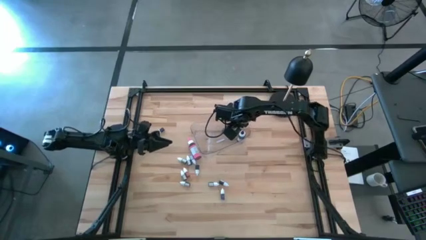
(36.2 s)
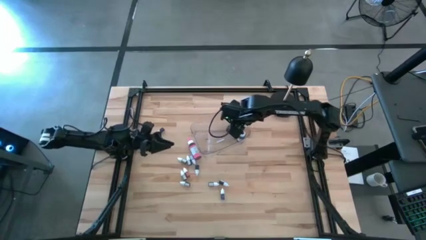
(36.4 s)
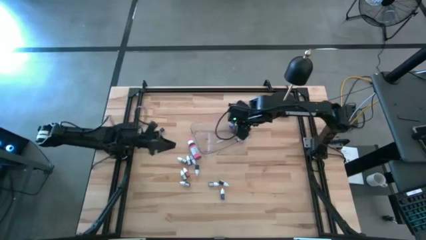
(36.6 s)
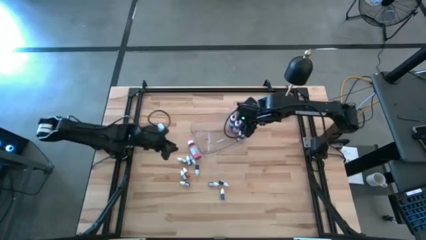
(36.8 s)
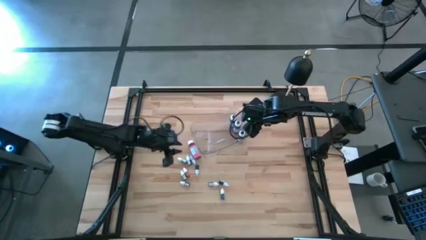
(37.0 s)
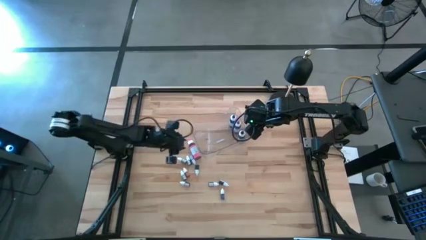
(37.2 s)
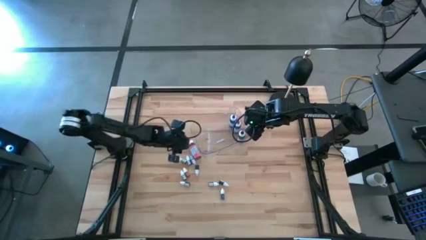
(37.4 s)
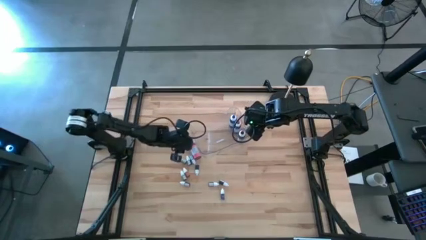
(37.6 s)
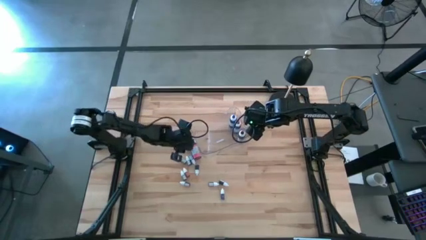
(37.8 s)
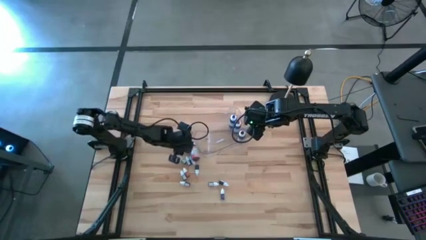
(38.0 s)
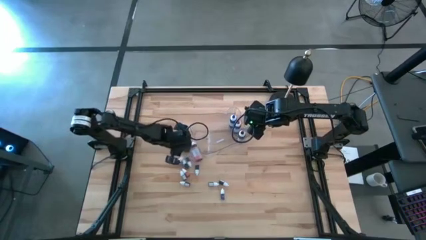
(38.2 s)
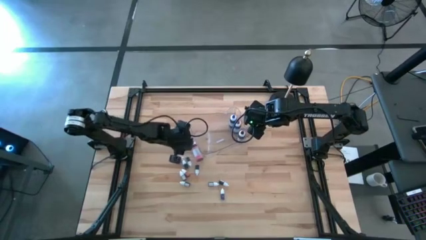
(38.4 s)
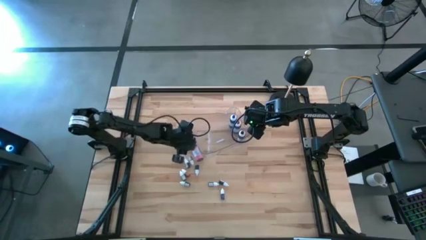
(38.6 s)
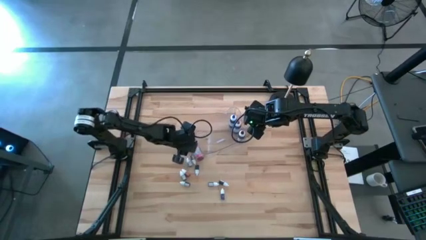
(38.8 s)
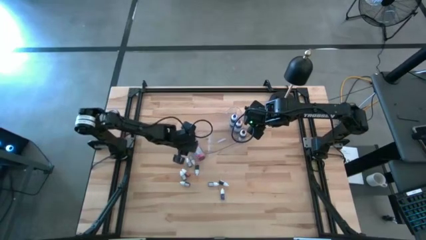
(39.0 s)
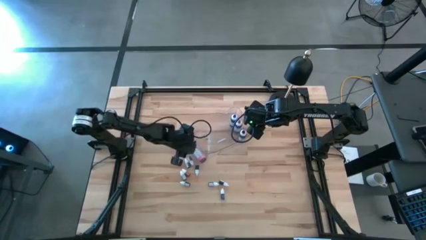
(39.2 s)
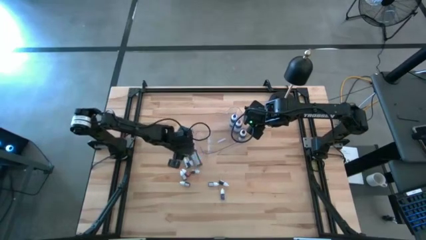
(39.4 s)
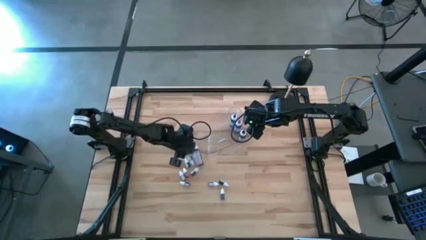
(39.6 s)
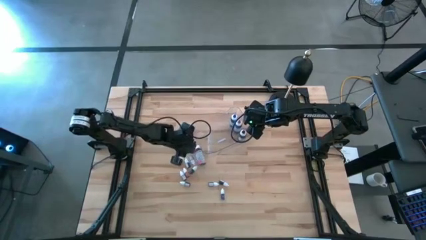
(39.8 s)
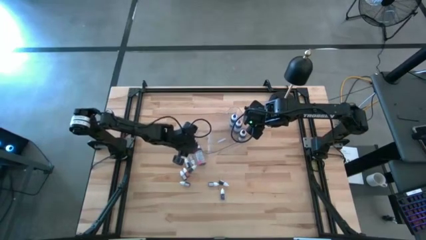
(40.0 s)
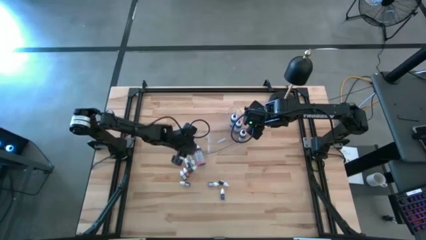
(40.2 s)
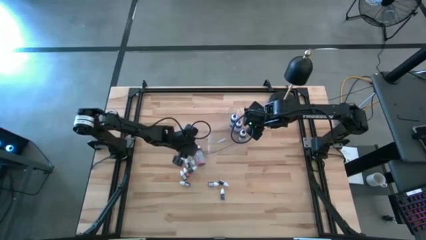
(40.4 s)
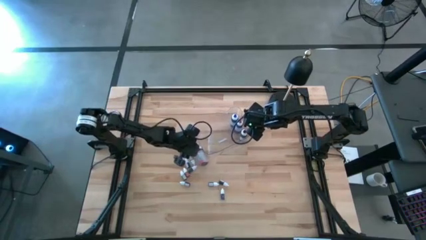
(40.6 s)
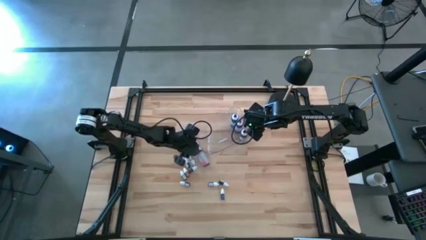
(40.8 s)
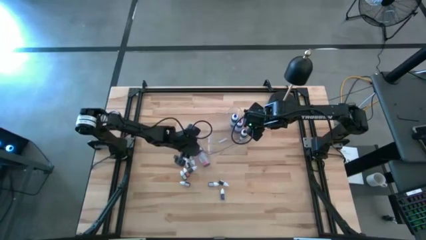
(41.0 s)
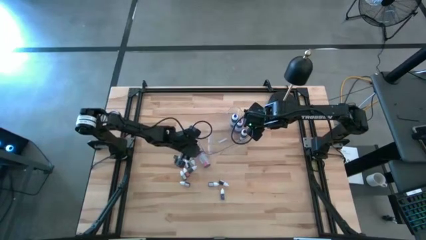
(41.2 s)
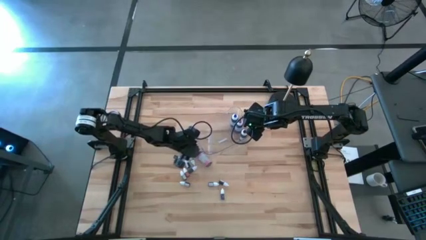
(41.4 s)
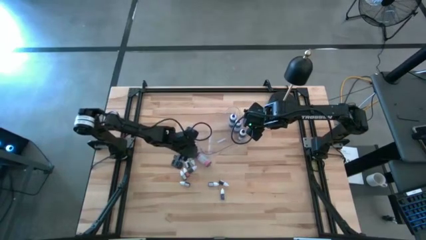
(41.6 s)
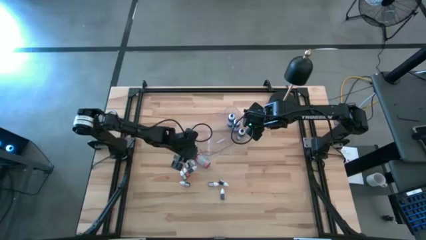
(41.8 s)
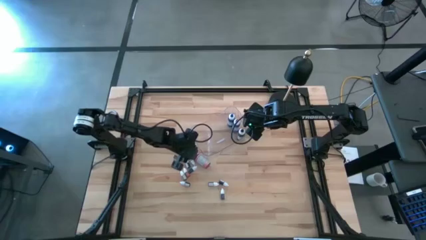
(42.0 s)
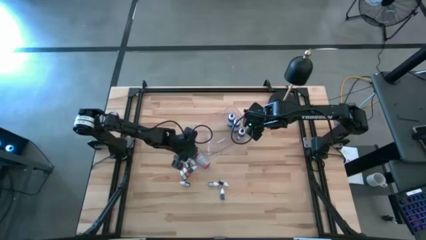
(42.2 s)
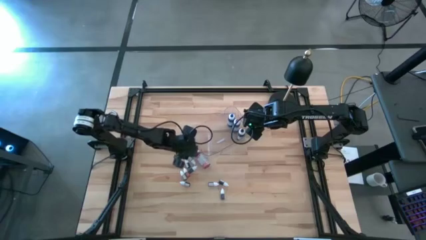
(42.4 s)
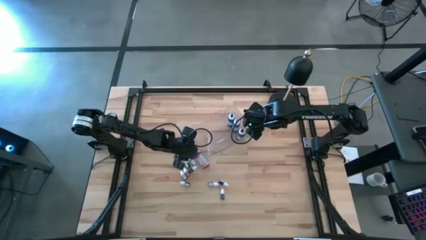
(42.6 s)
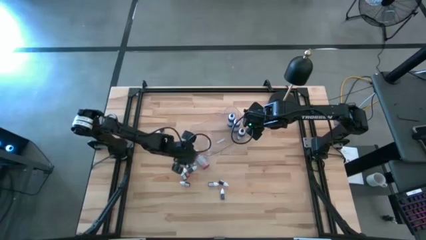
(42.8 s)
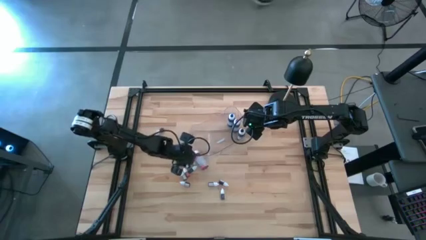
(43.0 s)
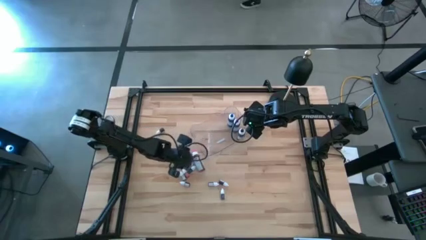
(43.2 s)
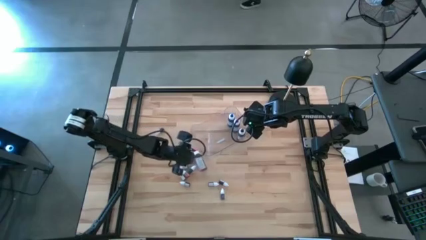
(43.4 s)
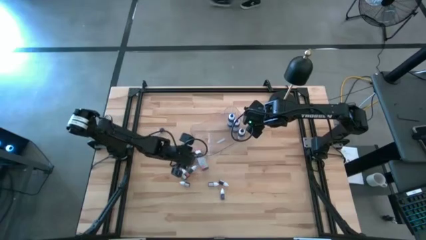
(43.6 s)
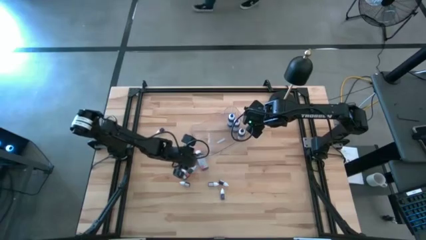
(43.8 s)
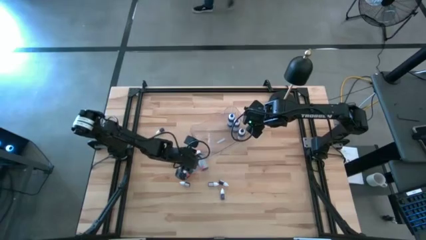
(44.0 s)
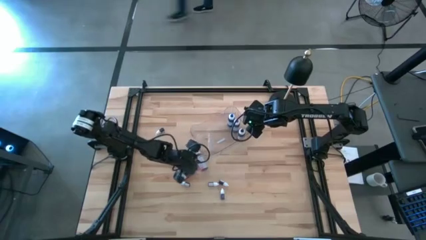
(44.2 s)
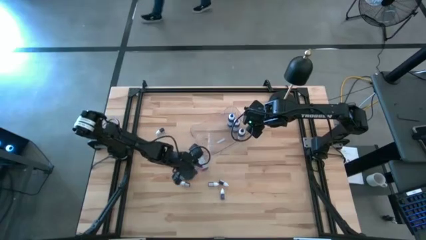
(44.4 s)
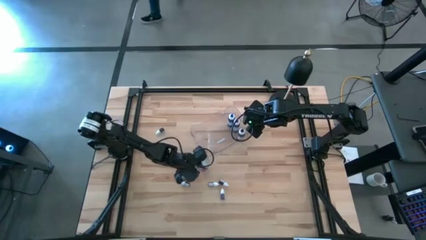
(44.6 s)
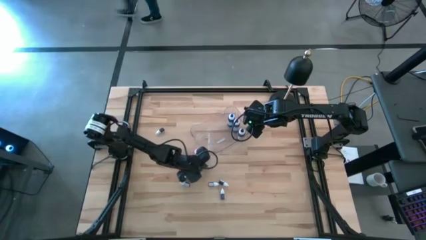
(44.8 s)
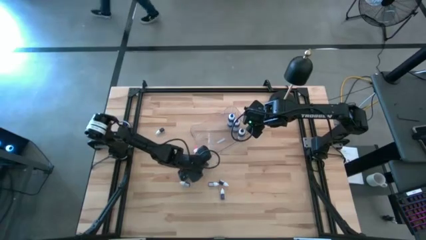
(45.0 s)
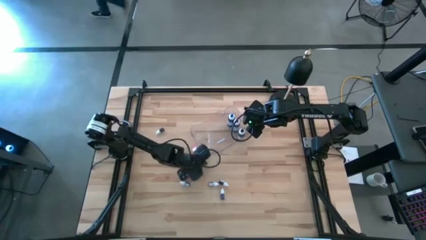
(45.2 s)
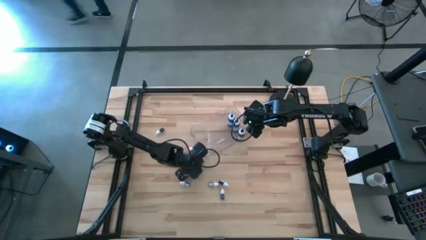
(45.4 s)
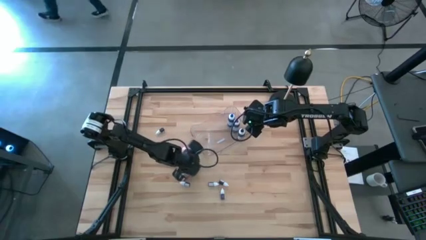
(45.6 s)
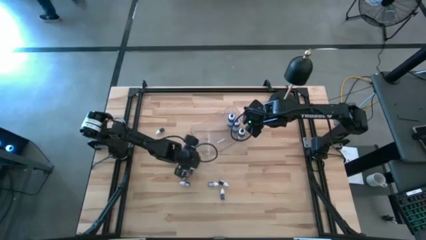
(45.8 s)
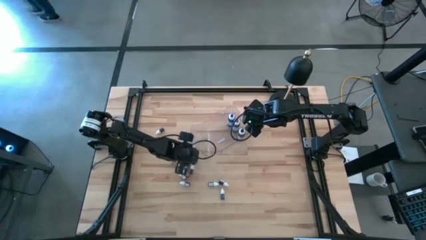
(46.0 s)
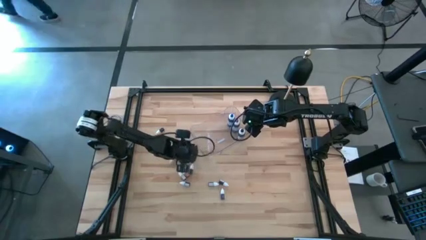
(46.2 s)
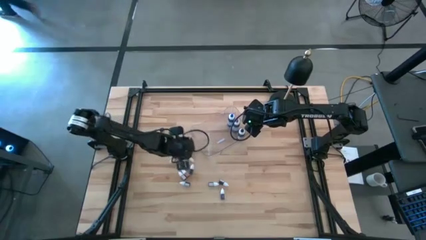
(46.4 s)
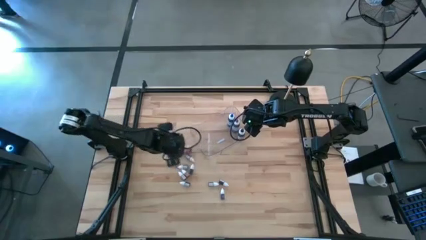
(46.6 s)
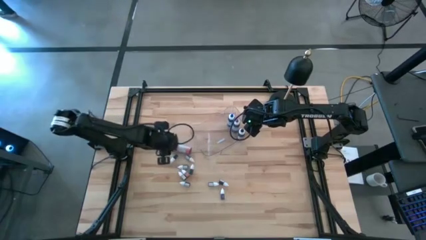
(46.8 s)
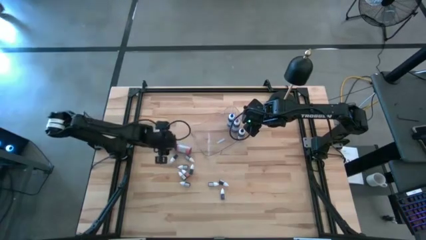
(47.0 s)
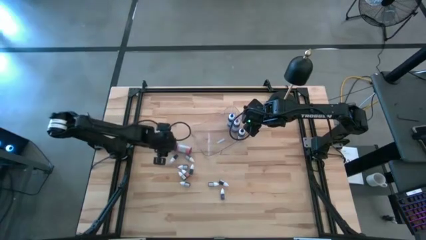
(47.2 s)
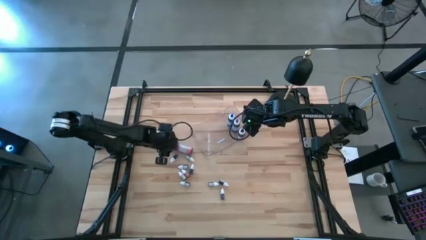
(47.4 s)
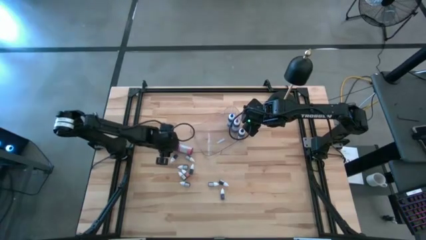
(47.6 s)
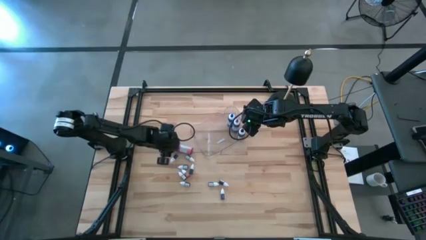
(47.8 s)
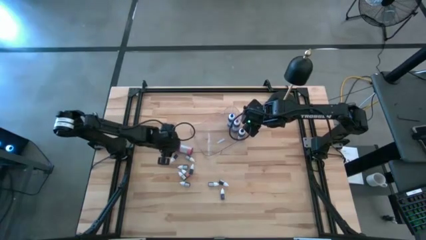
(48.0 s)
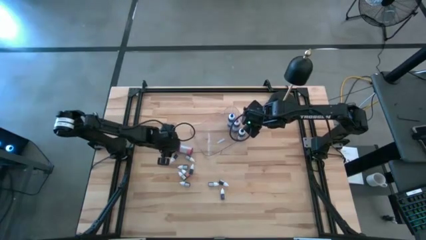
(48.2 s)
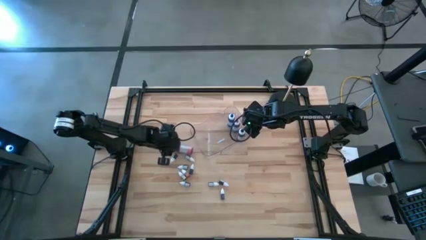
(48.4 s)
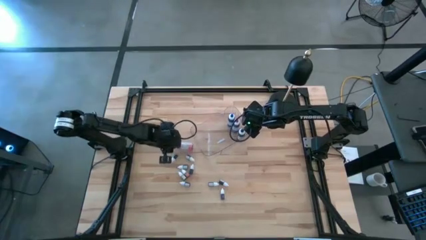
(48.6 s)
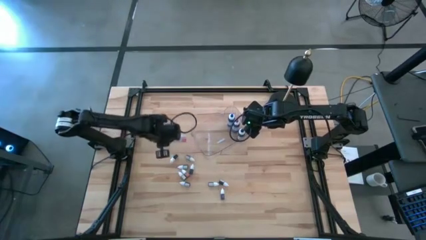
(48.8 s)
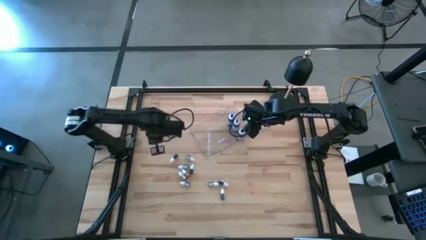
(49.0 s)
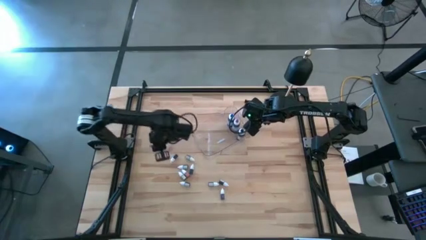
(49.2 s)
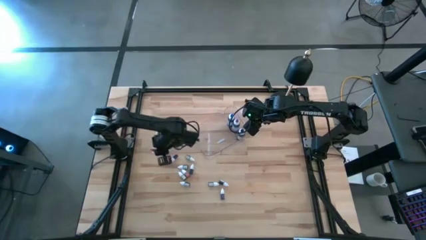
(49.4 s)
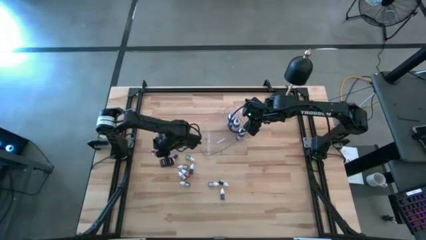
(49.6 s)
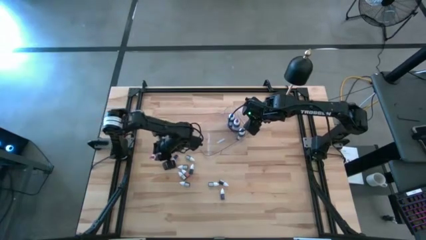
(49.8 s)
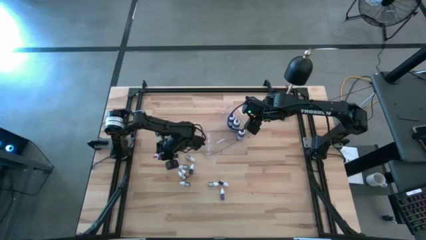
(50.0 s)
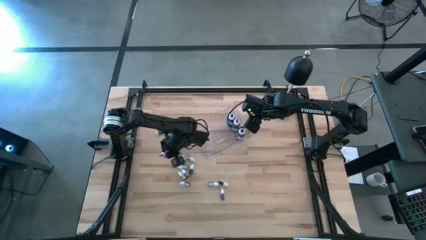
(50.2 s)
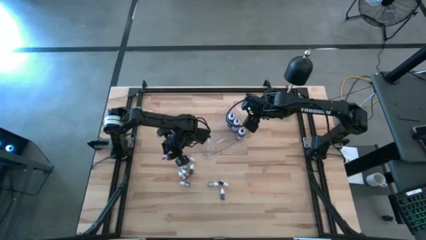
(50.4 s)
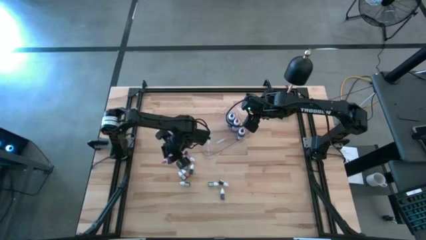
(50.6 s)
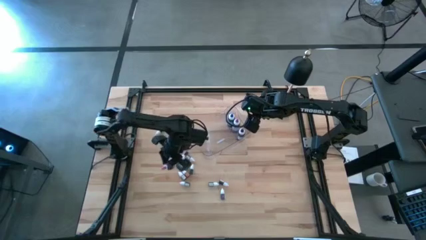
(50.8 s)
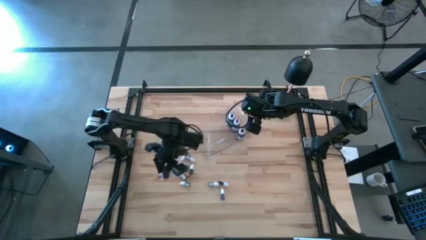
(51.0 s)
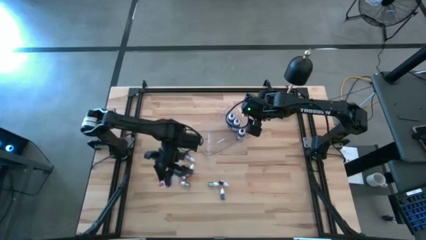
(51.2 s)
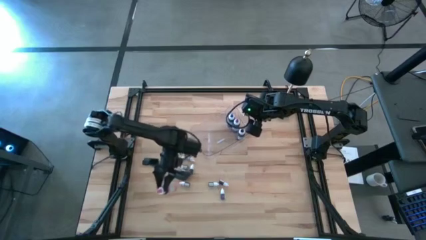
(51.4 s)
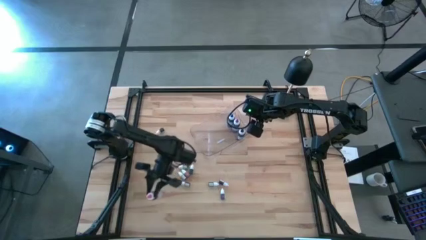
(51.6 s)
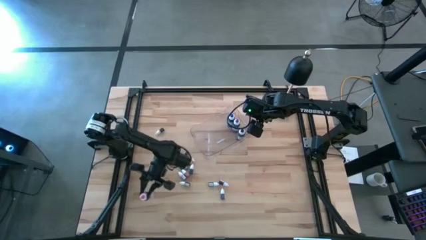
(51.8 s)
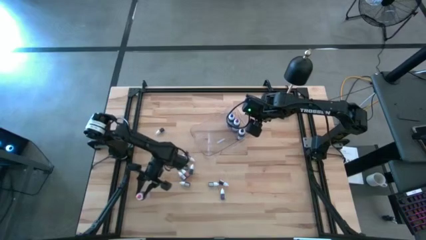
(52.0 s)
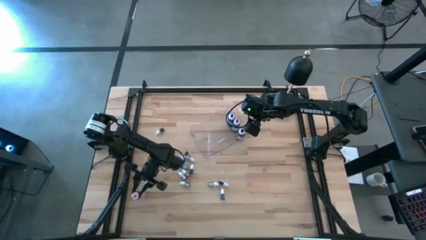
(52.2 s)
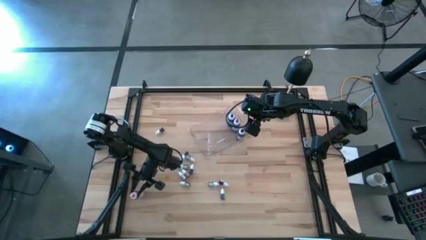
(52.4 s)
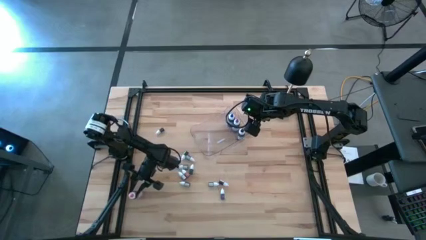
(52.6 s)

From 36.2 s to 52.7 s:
Task: Pick & Place food coloring
Put the big pink food coloring bottle into the transparent bin
